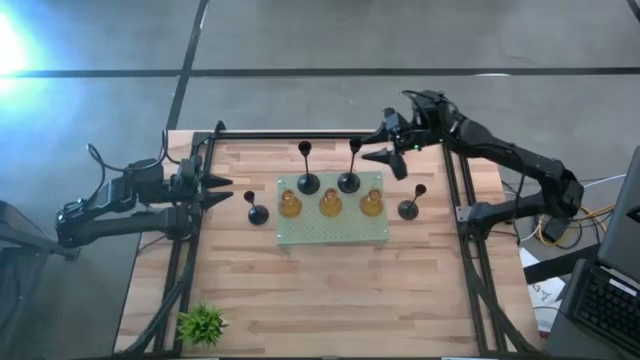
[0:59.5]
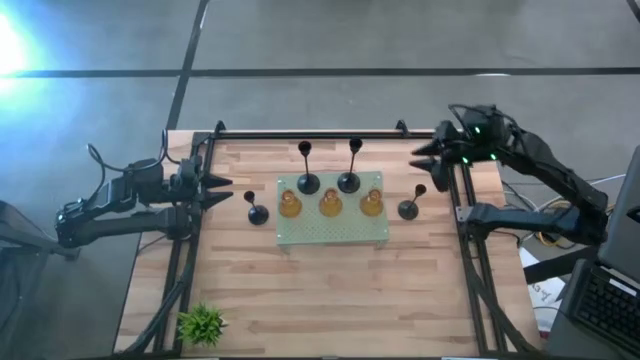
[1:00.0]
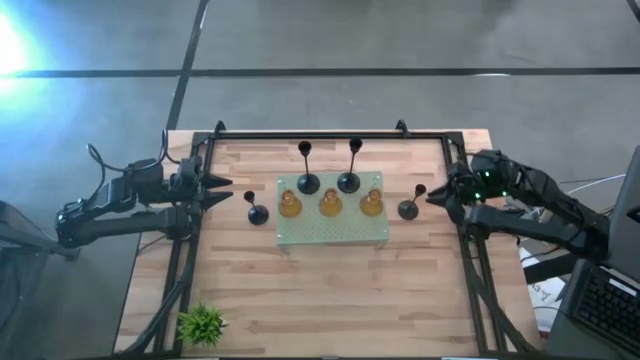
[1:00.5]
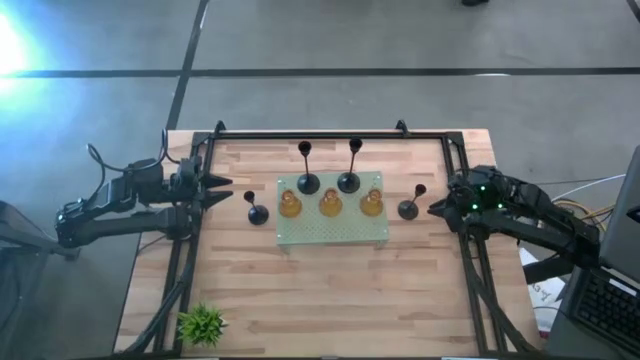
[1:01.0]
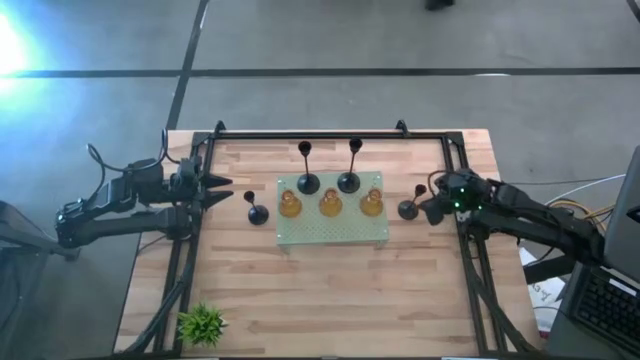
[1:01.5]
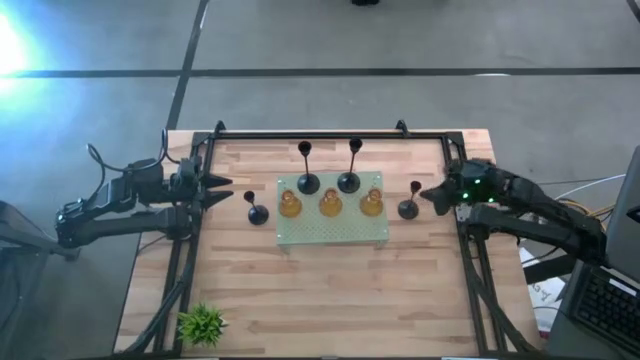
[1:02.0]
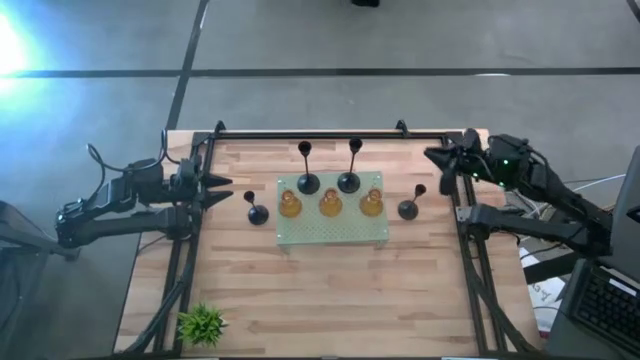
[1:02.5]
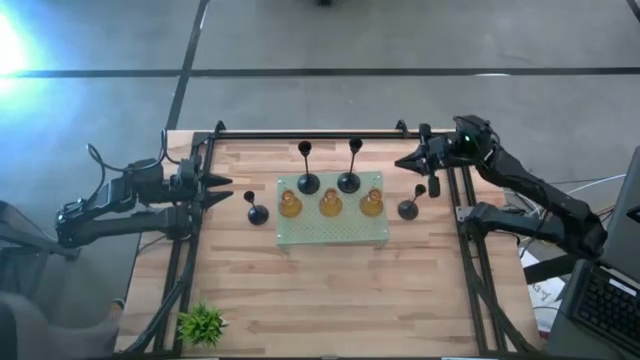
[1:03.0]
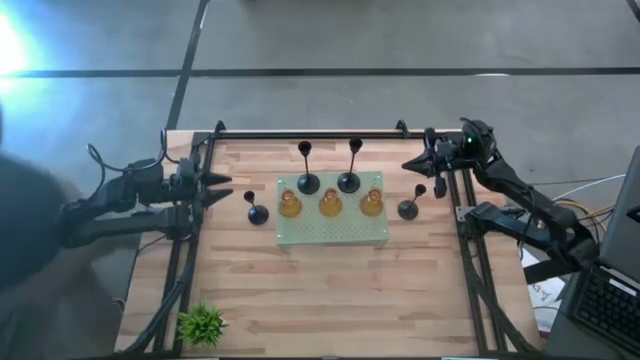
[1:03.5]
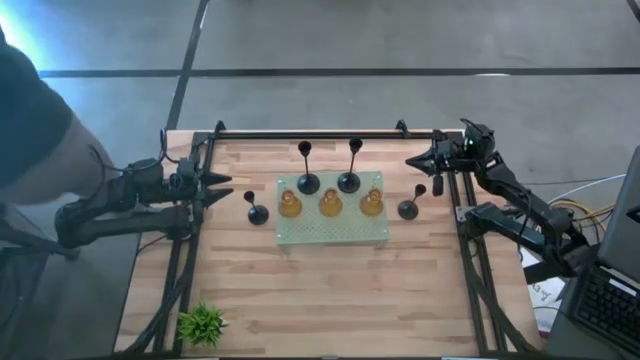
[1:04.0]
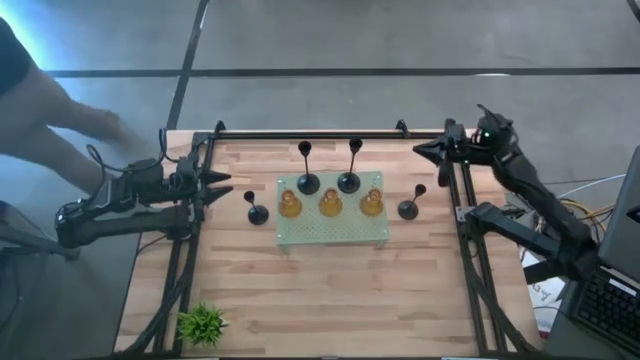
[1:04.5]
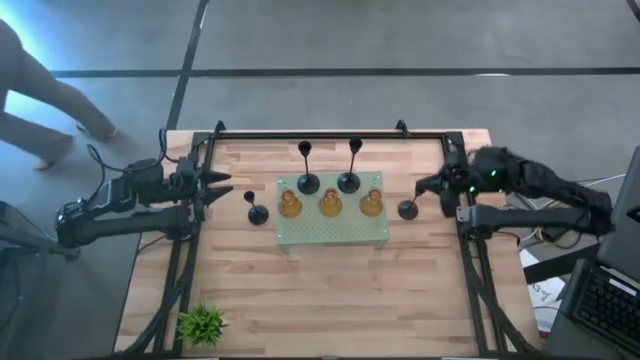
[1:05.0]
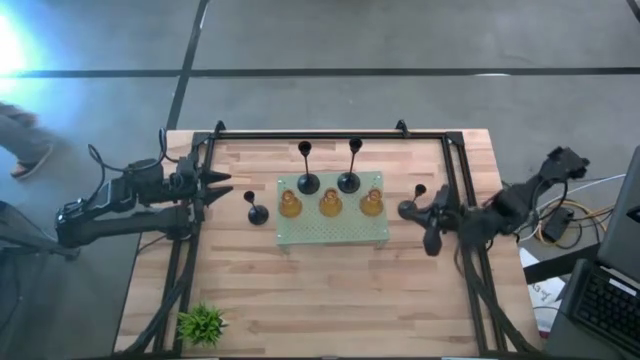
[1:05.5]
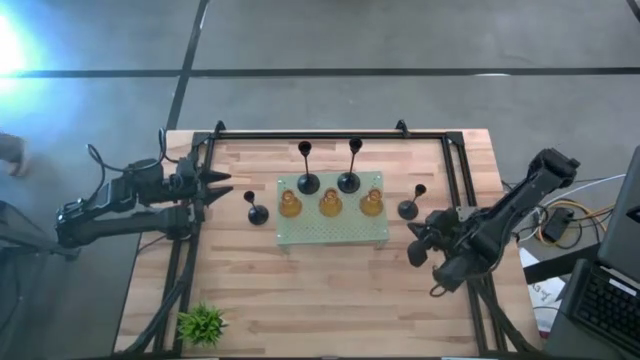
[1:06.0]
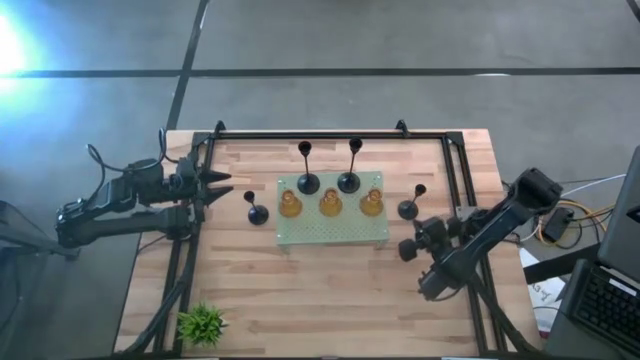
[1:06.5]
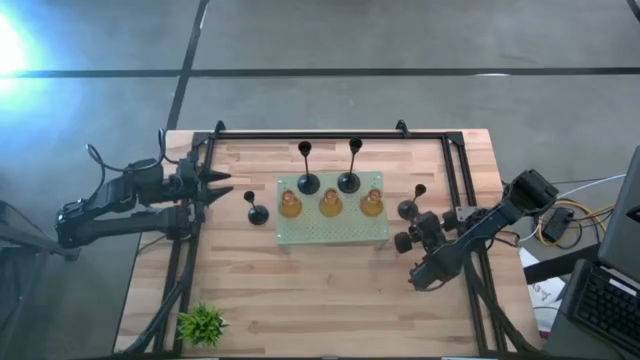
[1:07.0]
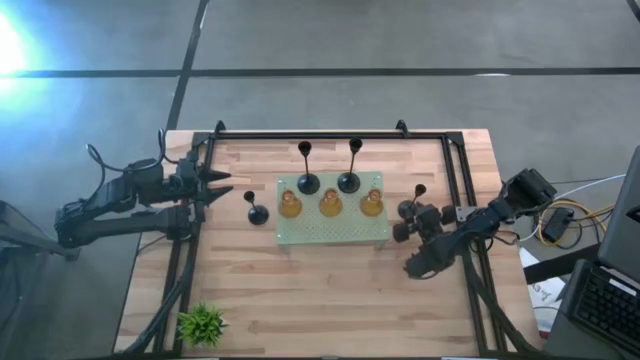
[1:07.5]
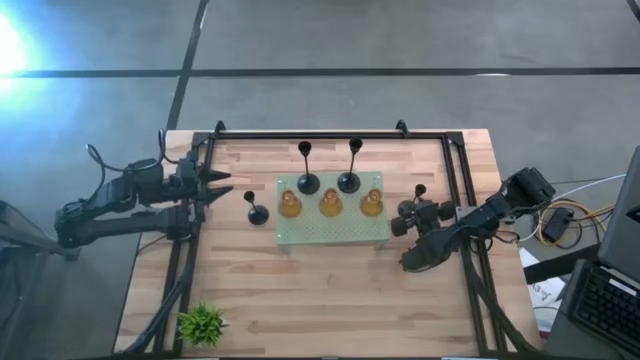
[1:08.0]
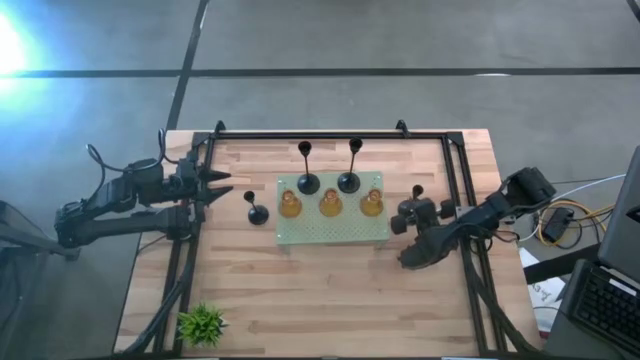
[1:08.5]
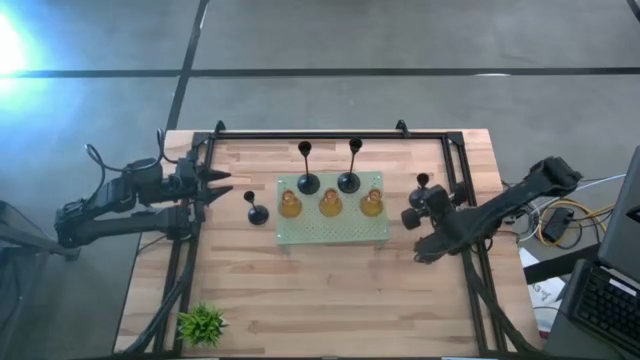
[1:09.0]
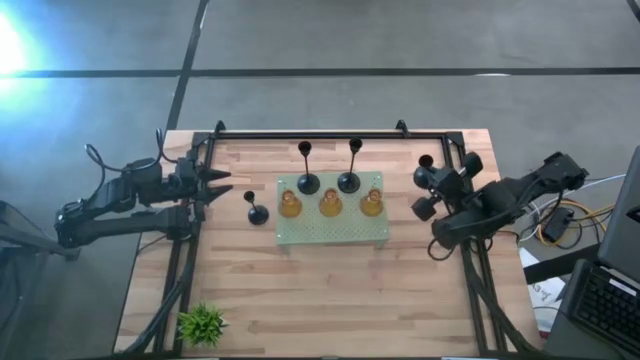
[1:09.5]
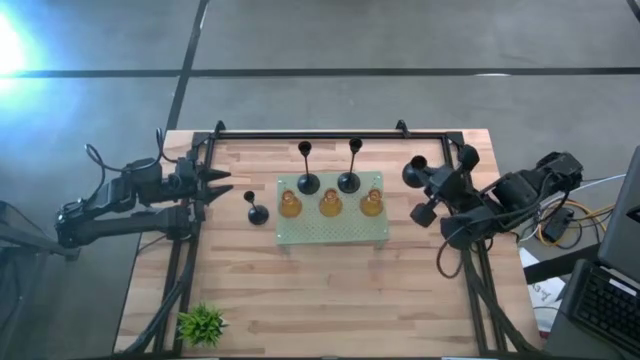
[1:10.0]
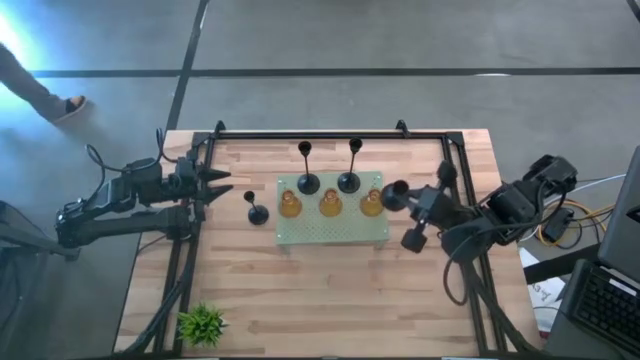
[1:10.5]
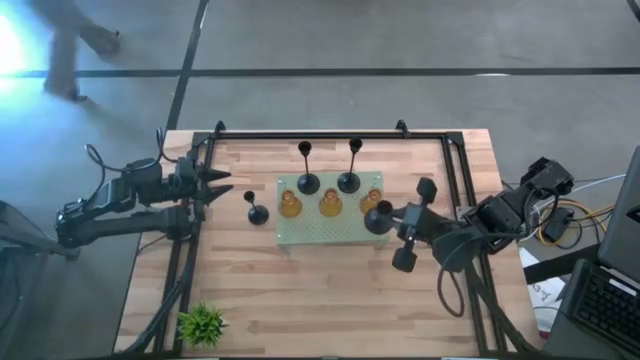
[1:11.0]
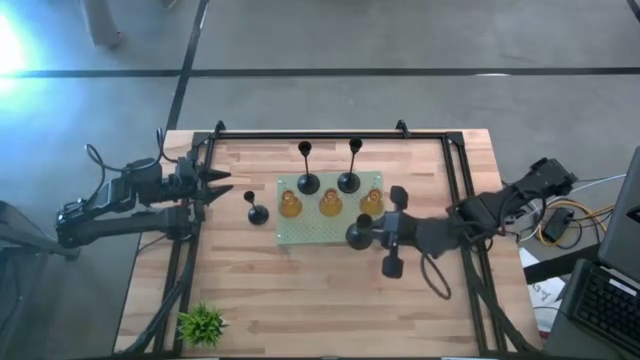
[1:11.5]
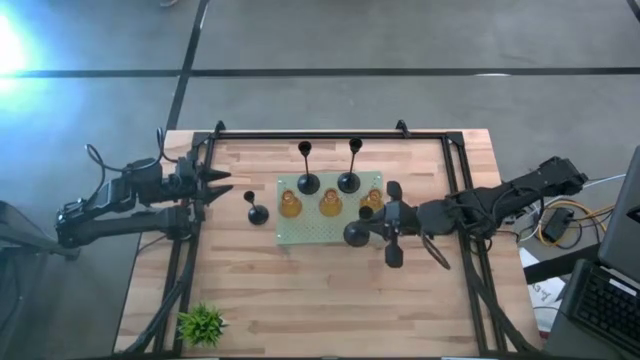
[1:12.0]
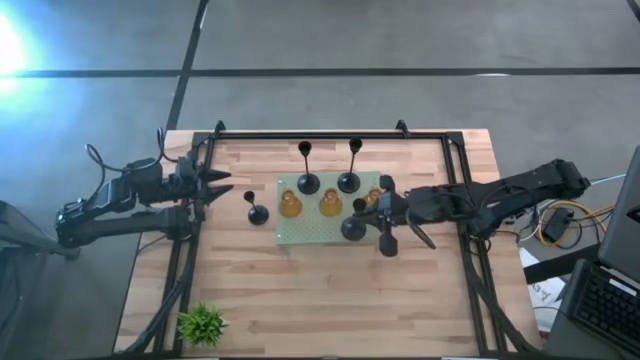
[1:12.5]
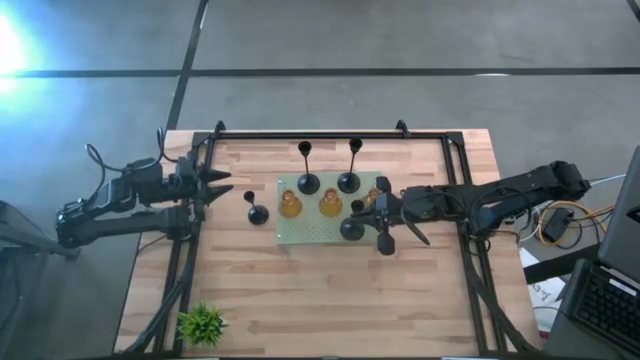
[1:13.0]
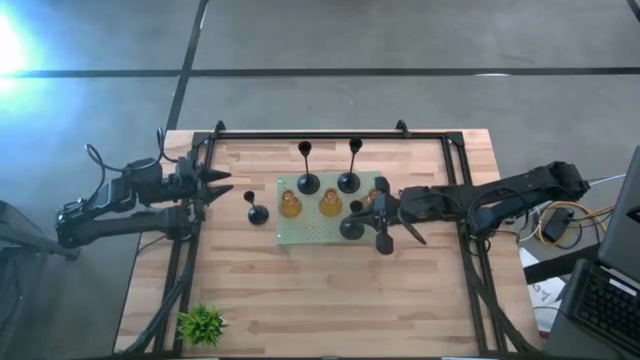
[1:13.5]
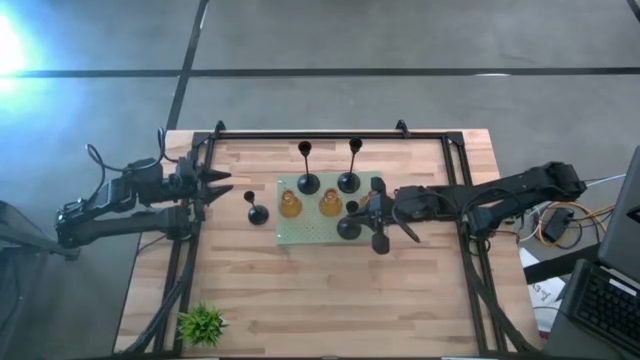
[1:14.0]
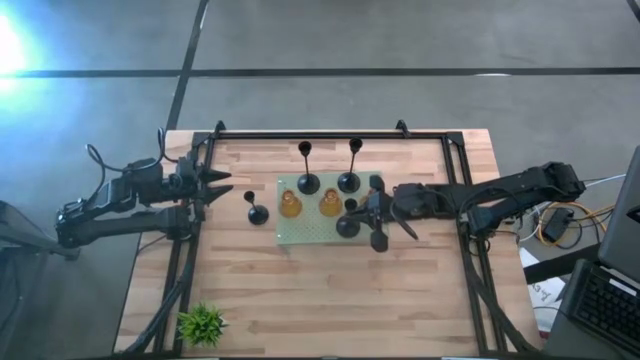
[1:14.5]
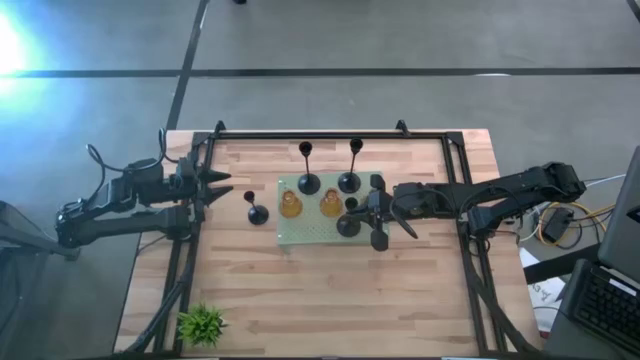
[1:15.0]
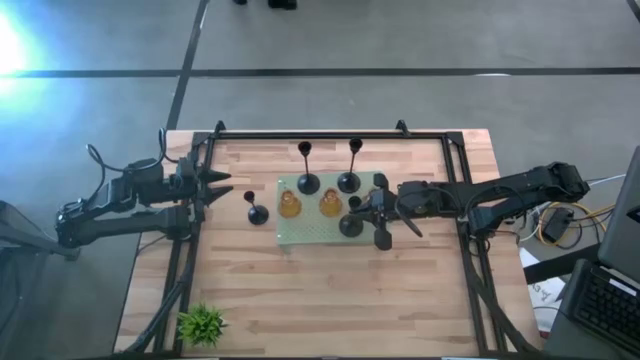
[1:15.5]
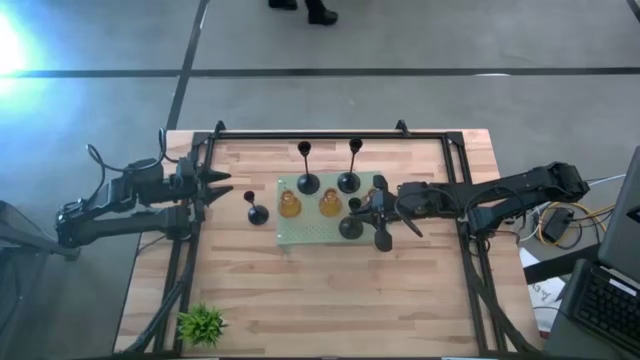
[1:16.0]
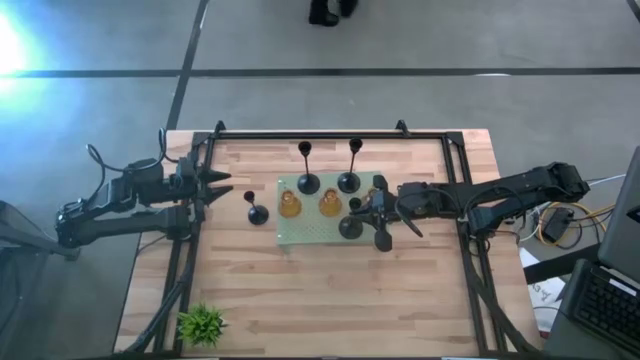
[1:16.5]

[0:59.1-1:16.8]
Task: Pick & Place candle stick holders
Put the black candle holder on the shelf

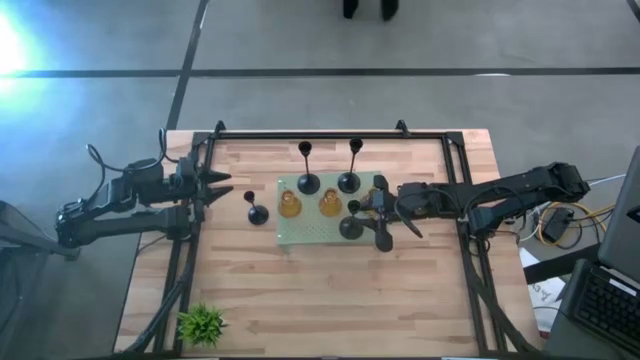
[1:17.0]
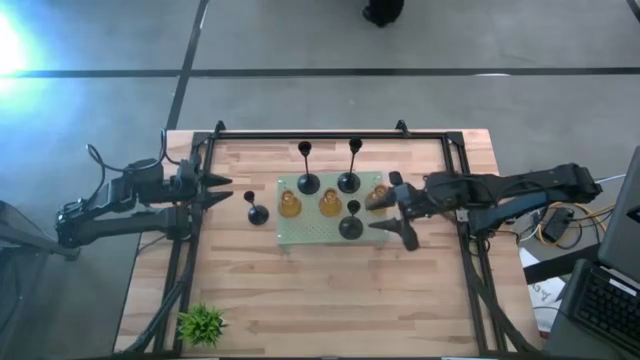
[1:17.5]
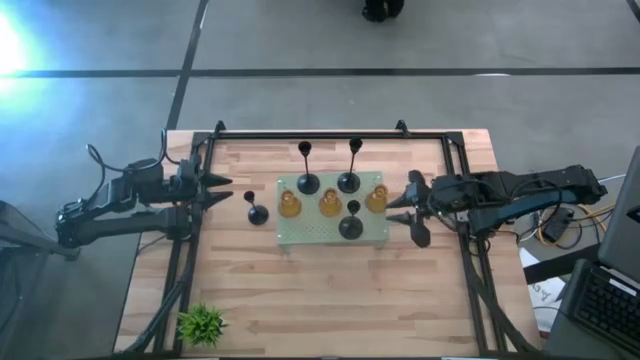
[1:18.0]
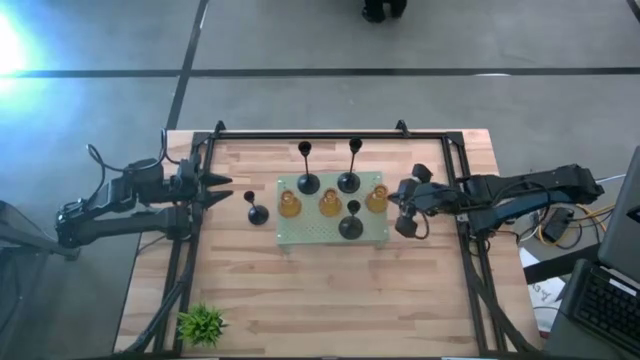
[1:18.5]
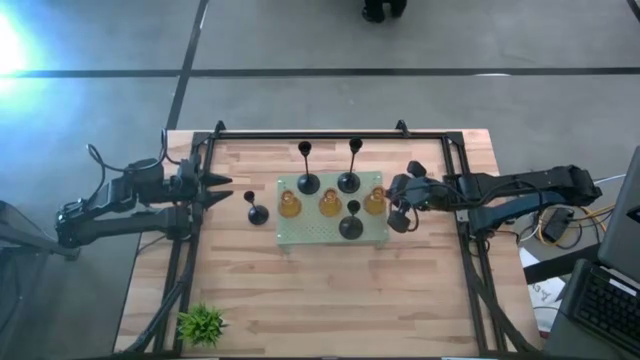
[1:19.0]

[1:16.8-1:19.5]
Adjust the yellow glass candle holder on the shelf
